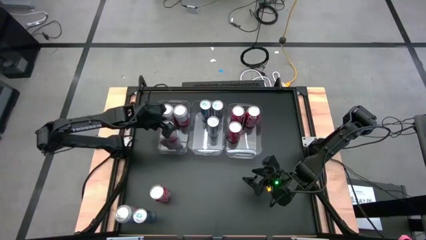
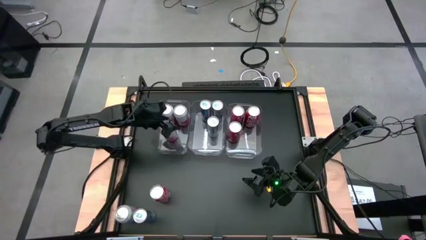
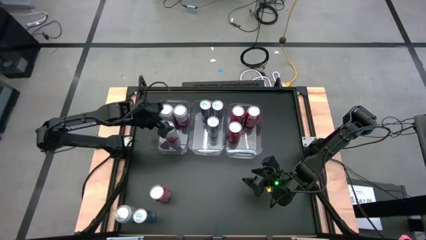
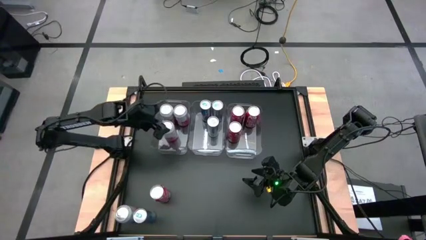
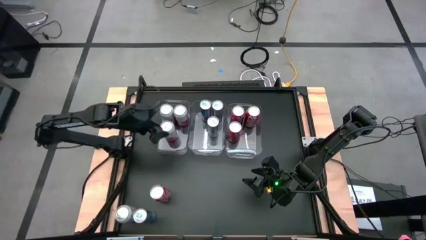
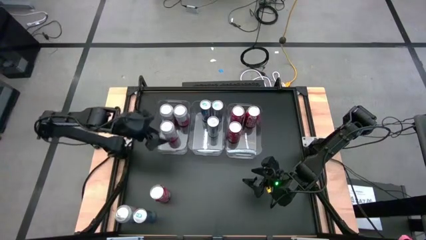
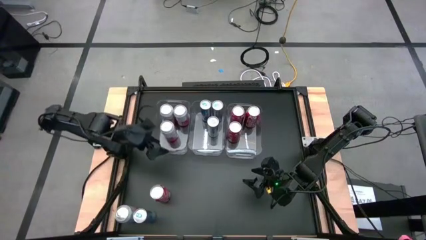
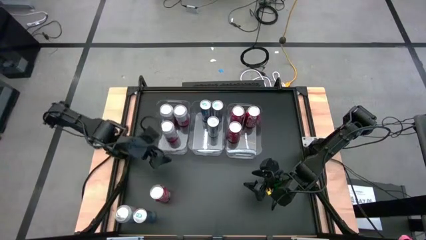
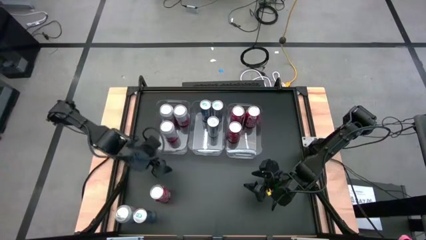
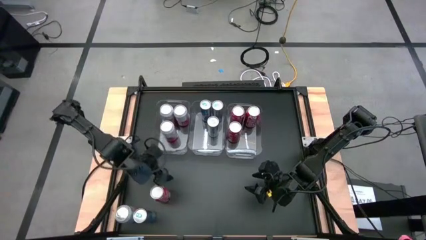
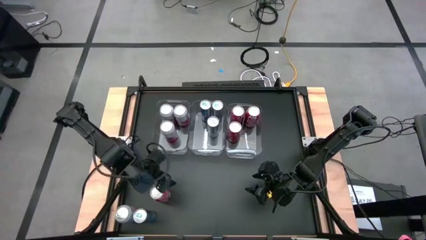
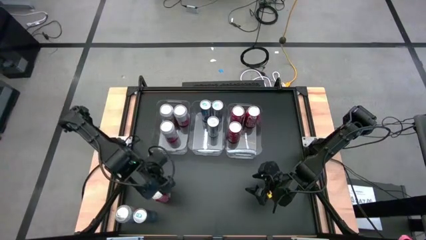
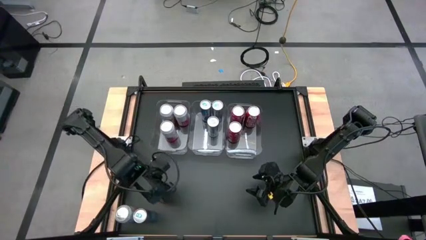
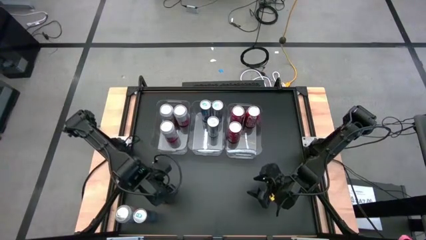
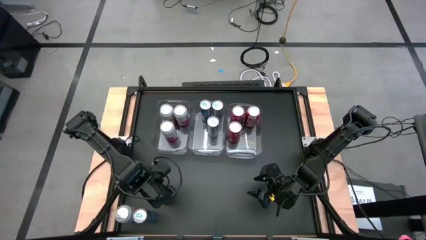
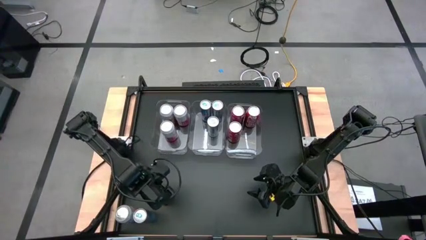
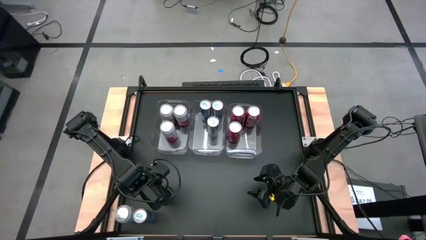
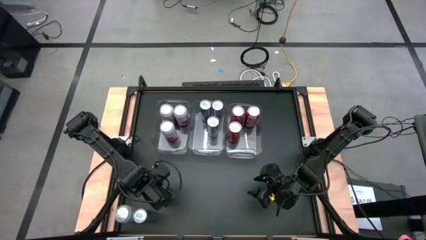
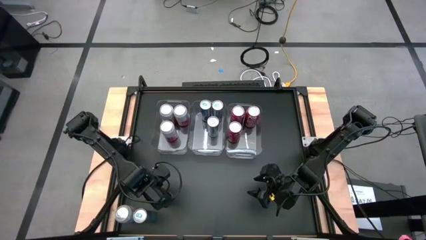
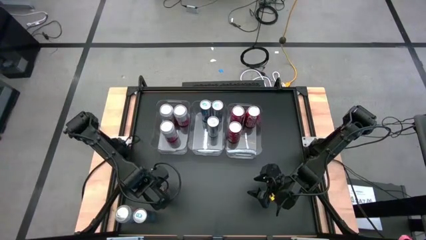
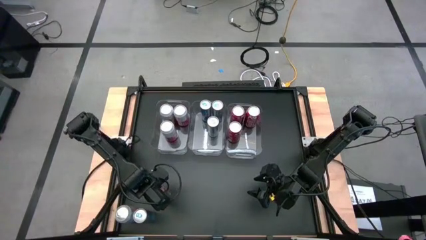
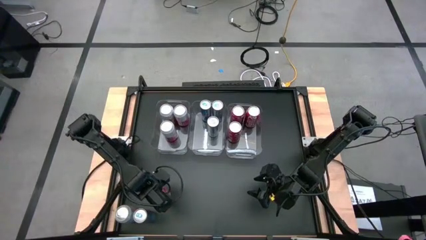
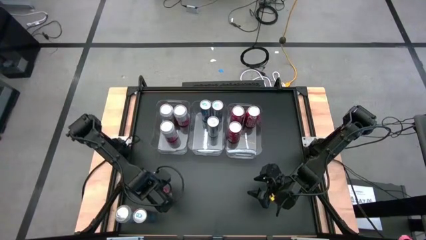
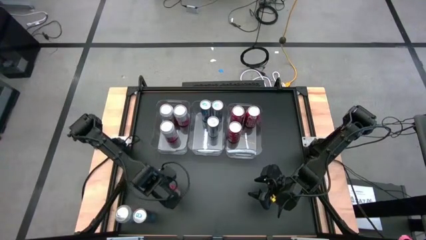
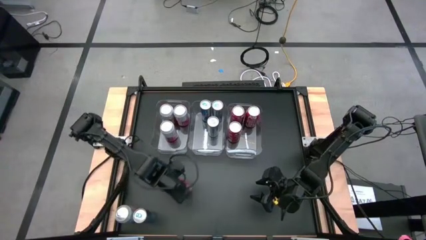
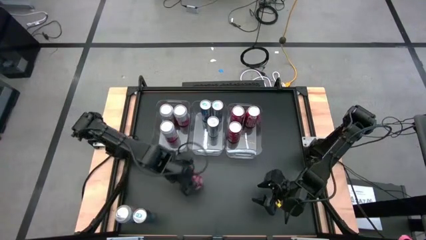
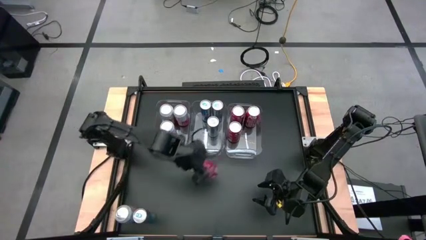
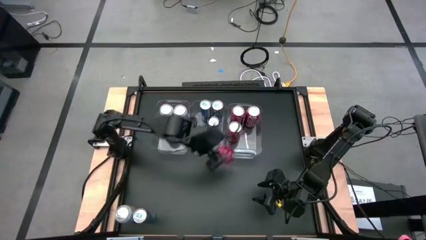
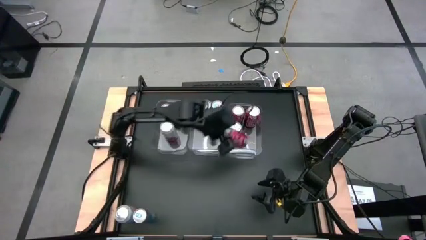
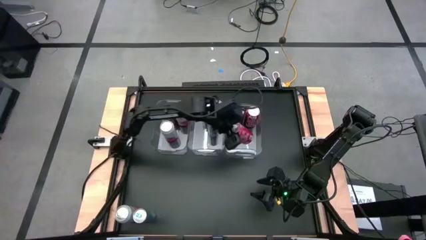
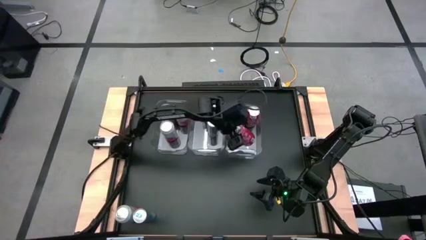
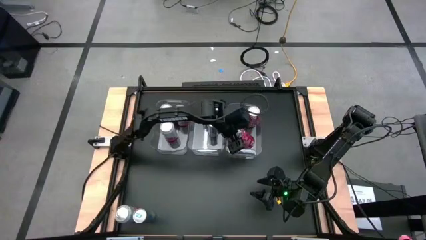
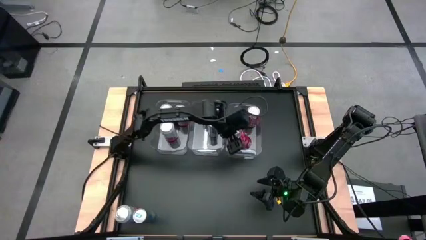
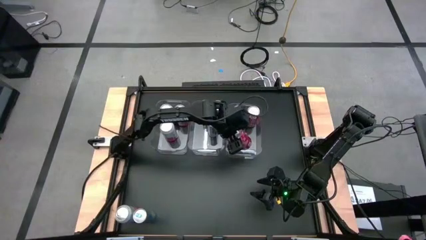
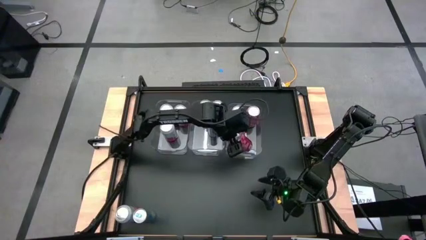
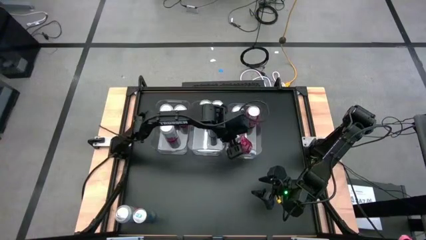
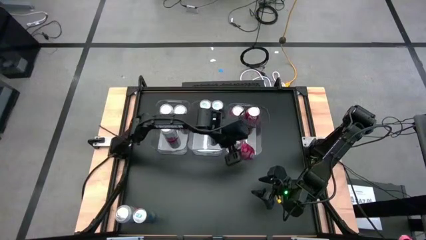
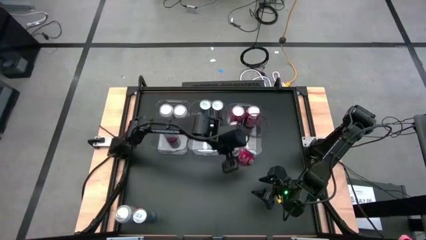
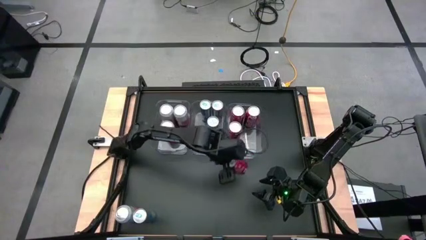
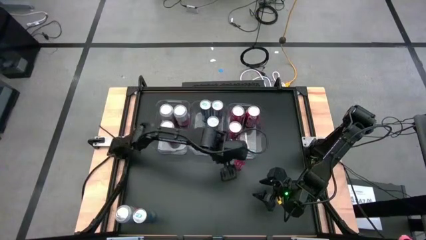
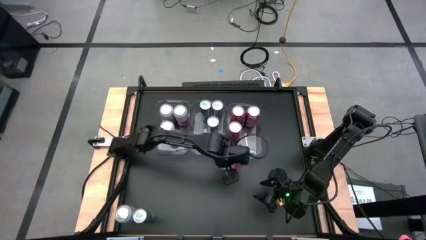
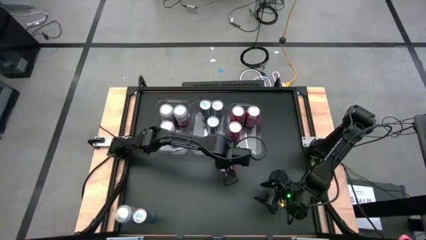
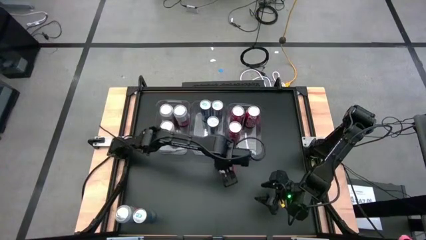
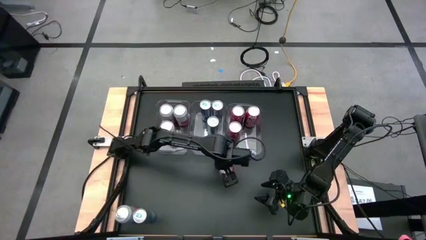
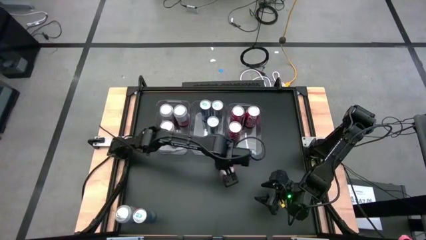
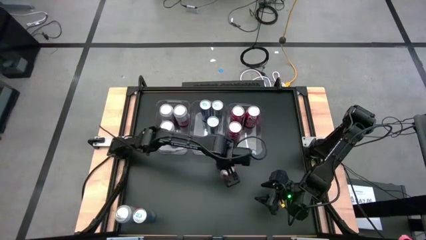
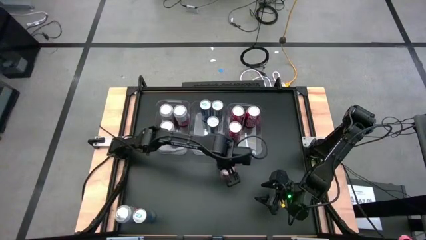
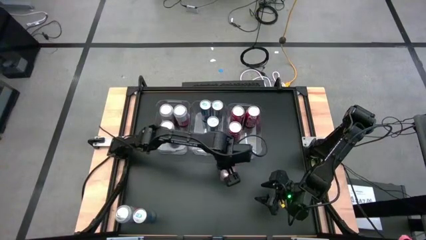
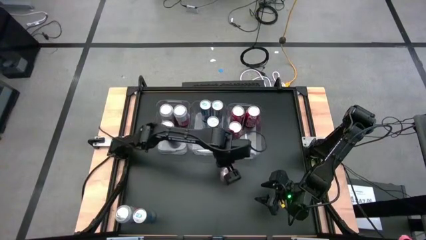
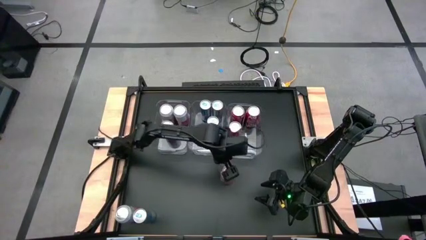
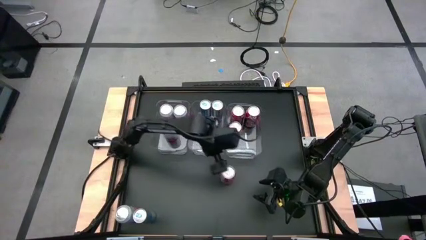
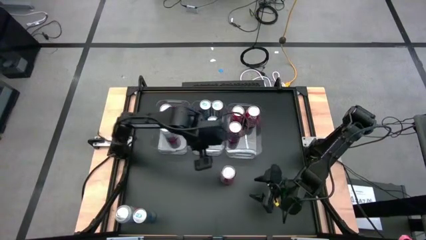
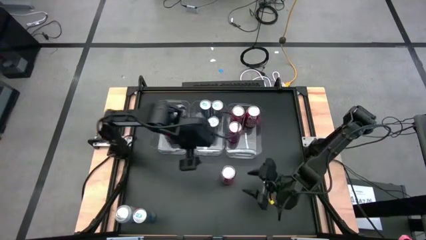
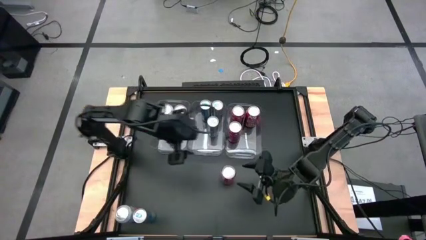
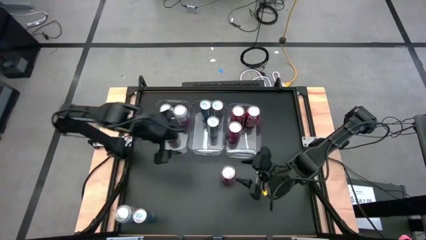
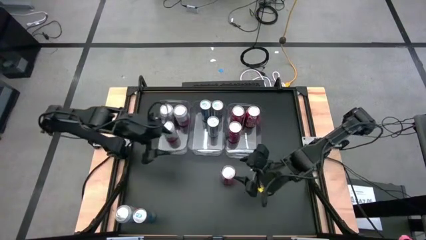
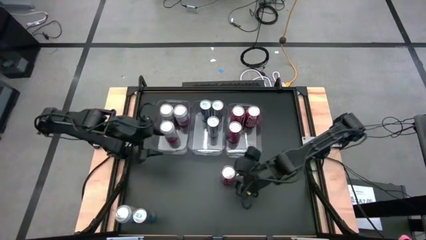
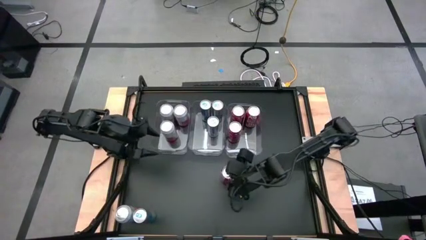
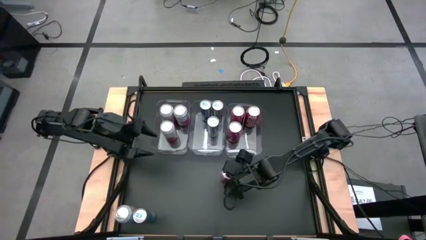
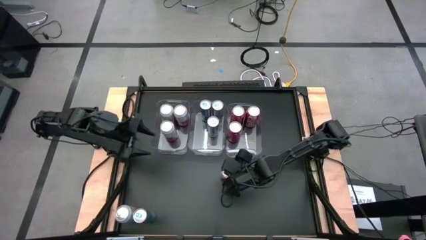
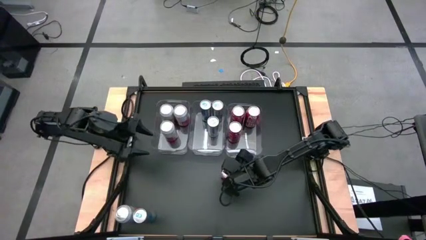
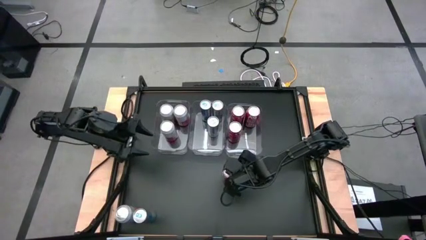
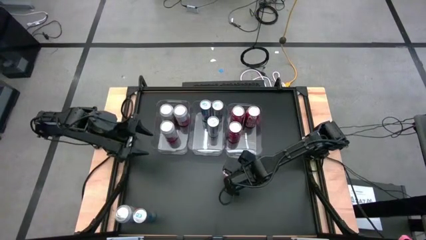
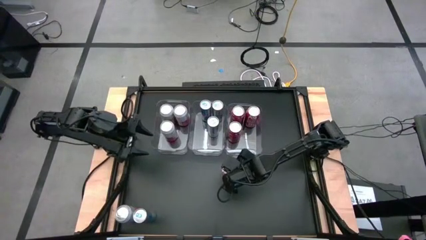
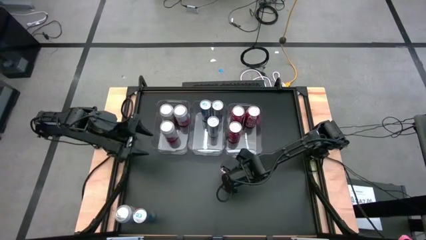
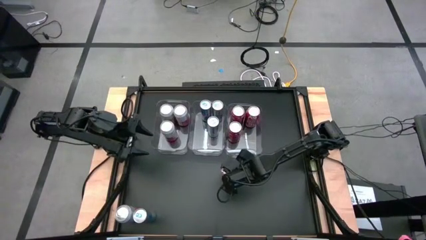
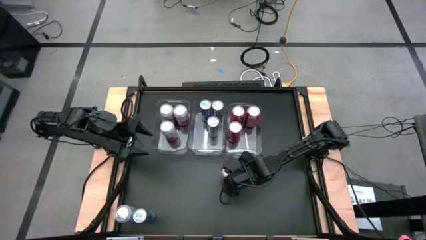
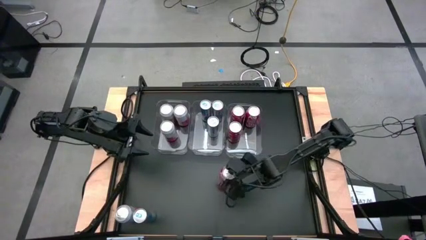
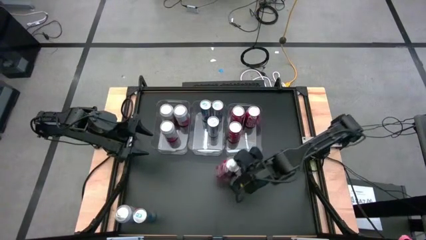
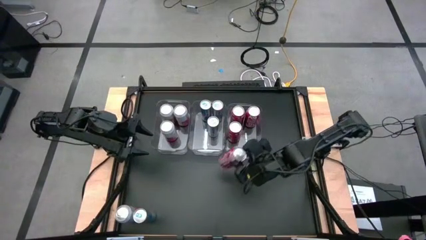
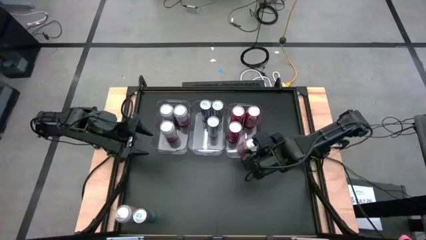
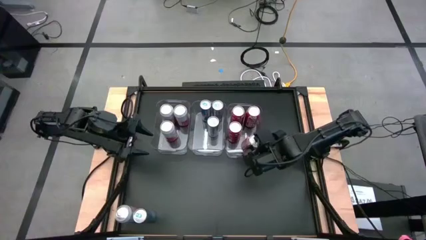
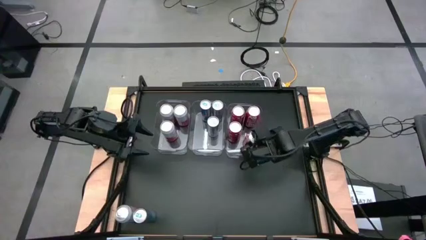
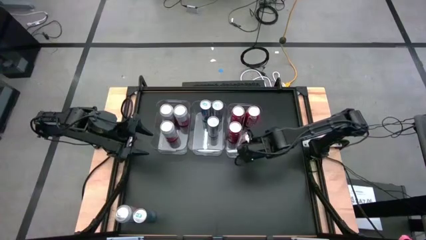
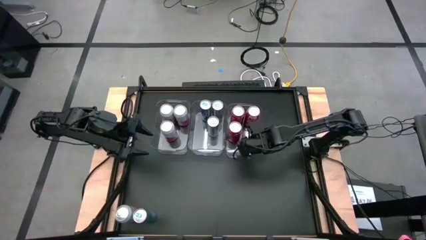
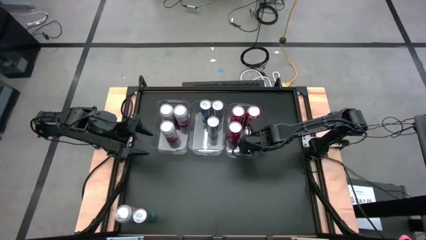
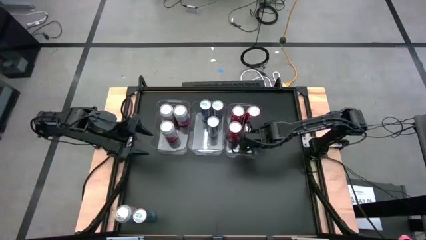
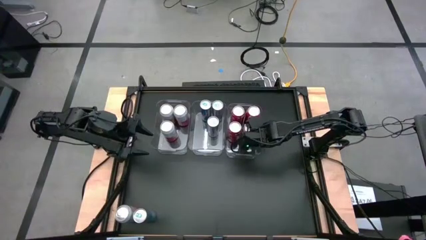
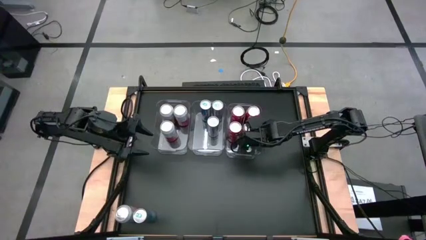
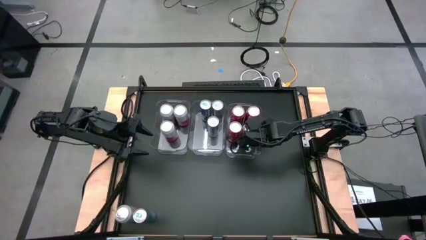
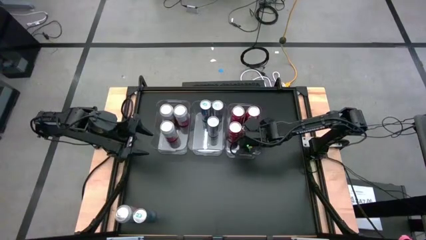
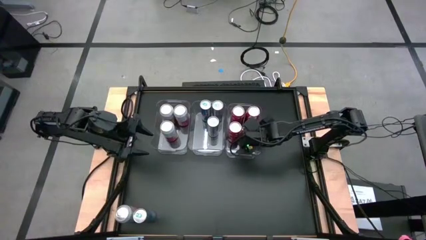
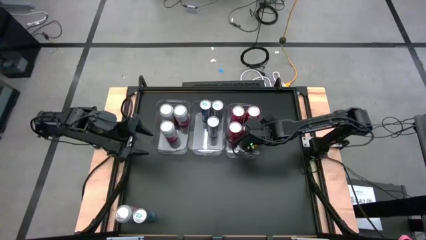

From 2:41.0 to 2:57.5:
Task: Sort soda cans
Put the red soda can into the right transparent bin
